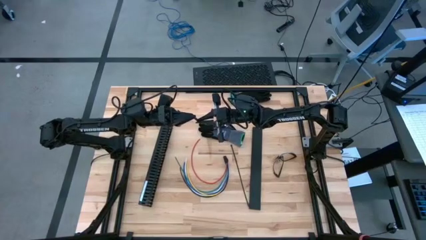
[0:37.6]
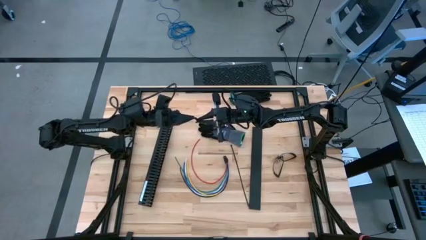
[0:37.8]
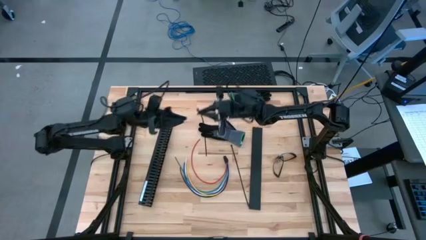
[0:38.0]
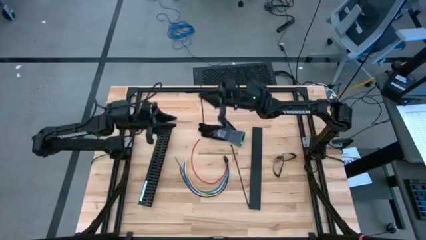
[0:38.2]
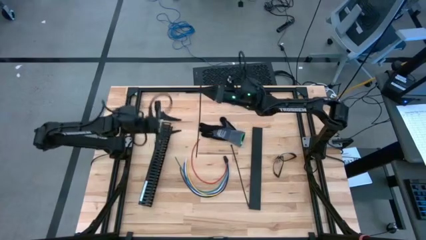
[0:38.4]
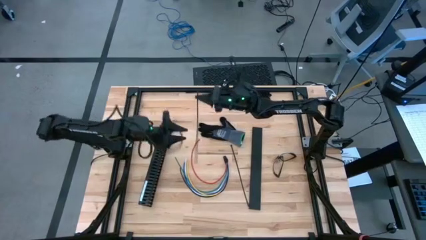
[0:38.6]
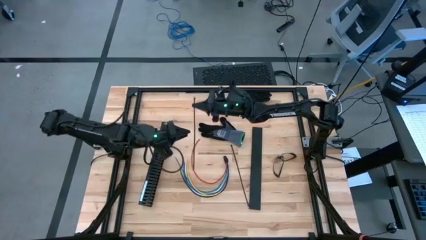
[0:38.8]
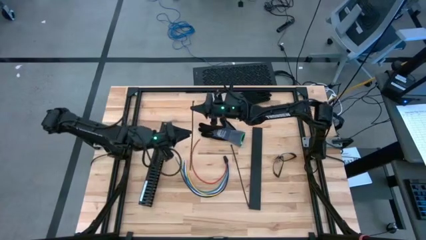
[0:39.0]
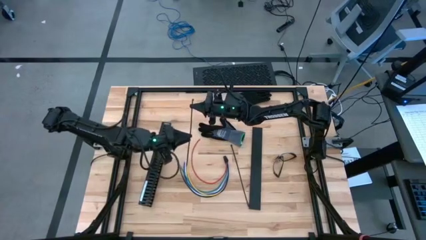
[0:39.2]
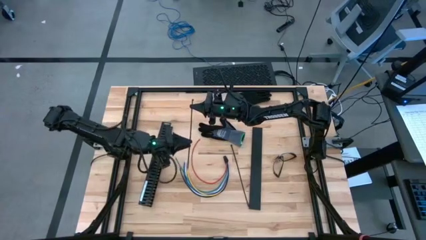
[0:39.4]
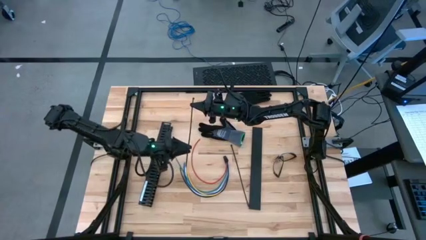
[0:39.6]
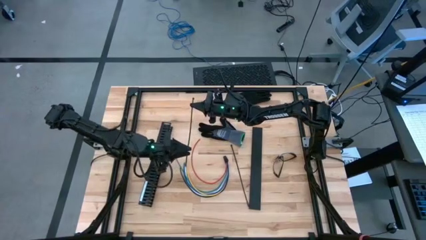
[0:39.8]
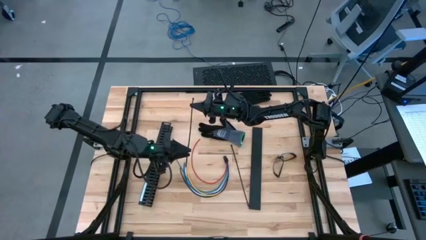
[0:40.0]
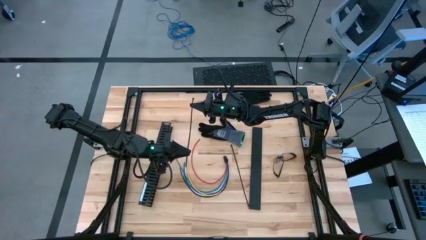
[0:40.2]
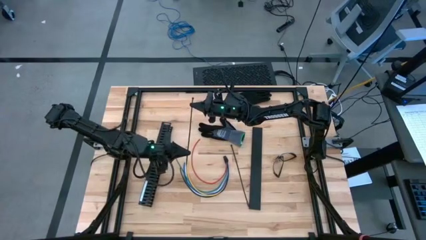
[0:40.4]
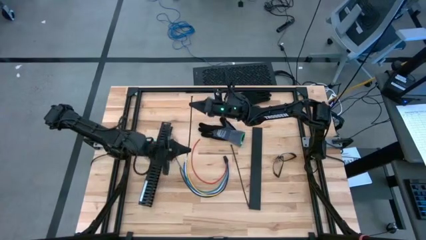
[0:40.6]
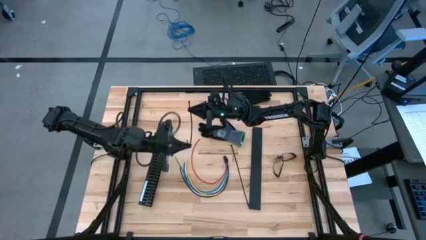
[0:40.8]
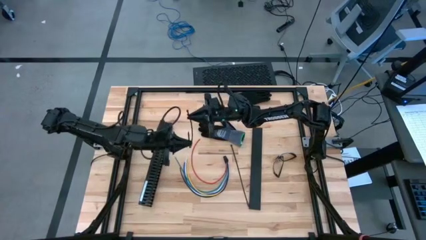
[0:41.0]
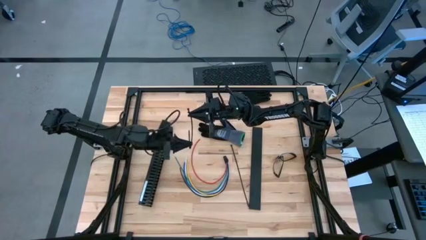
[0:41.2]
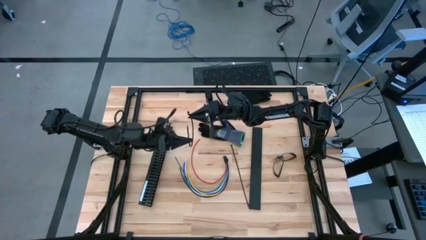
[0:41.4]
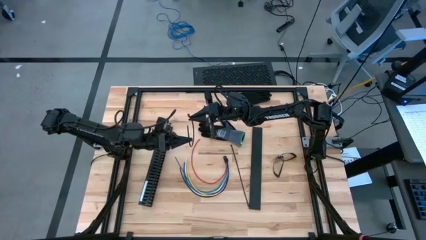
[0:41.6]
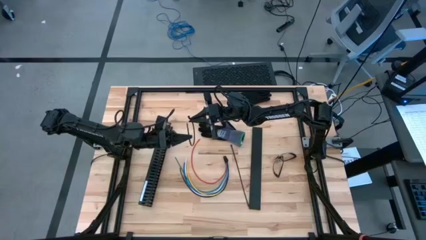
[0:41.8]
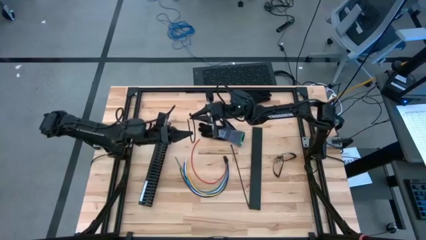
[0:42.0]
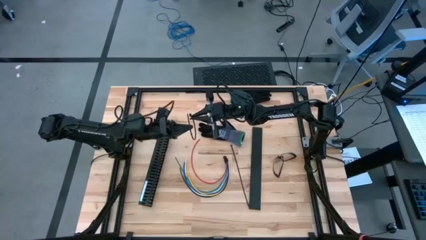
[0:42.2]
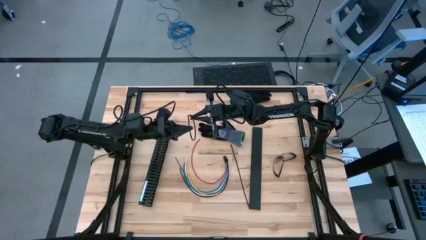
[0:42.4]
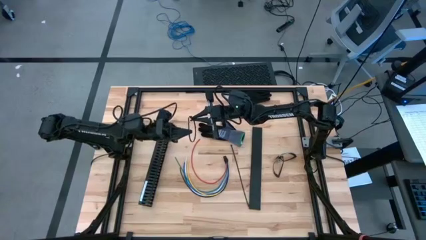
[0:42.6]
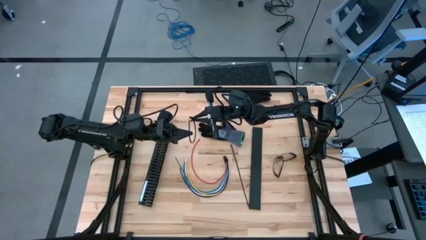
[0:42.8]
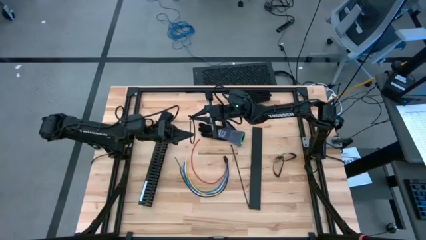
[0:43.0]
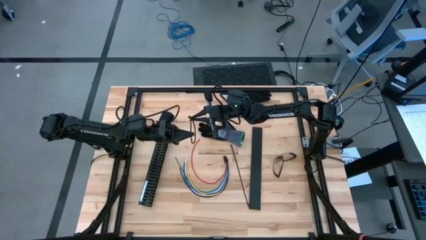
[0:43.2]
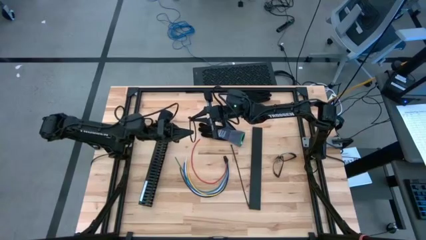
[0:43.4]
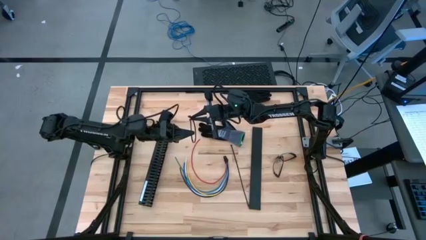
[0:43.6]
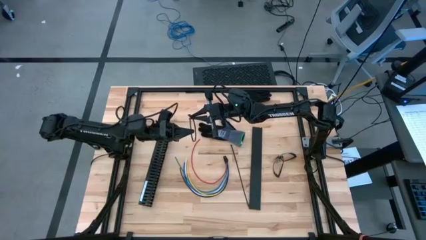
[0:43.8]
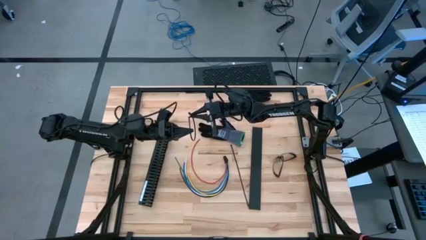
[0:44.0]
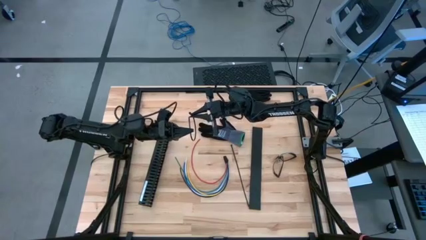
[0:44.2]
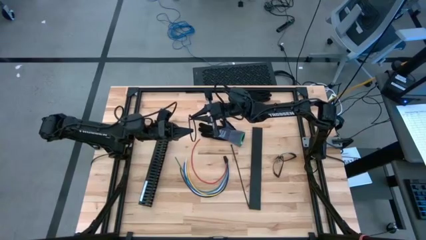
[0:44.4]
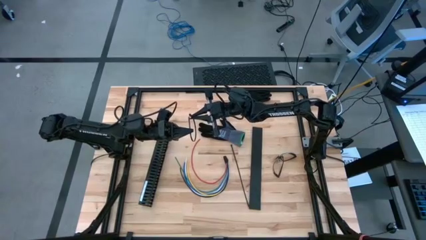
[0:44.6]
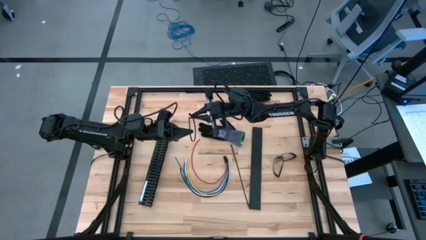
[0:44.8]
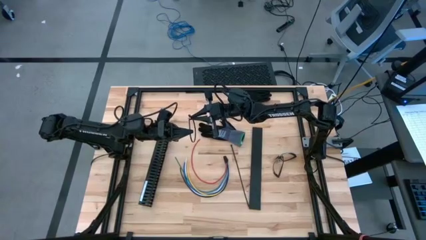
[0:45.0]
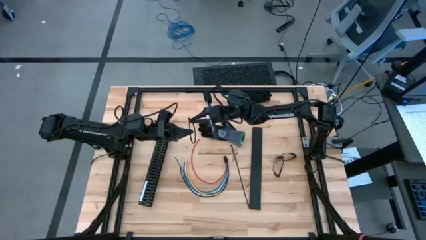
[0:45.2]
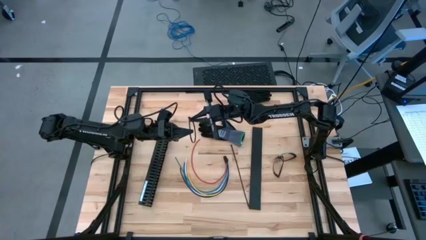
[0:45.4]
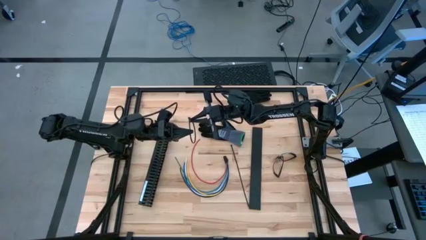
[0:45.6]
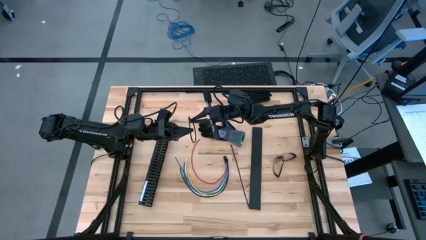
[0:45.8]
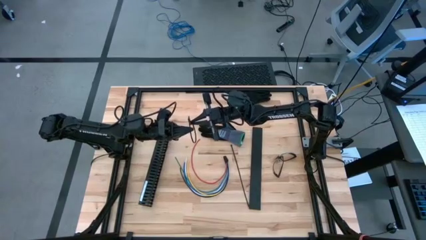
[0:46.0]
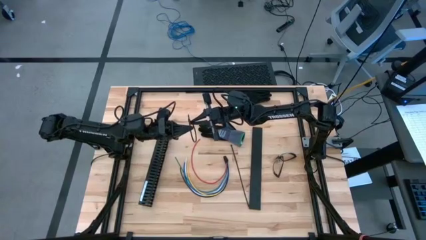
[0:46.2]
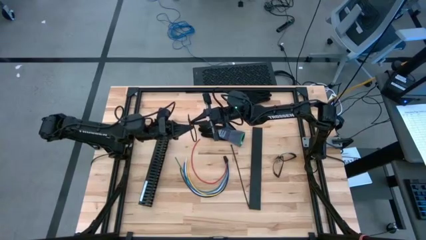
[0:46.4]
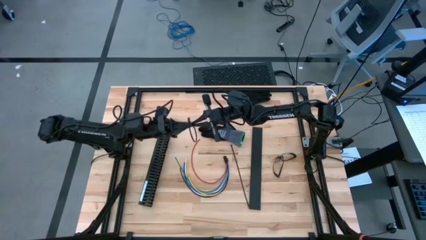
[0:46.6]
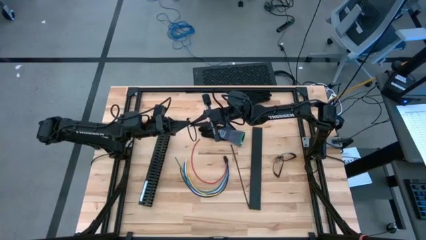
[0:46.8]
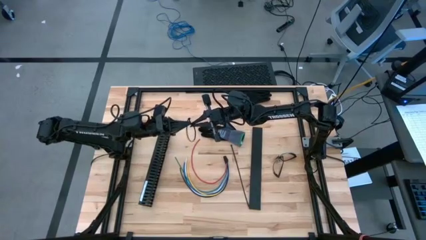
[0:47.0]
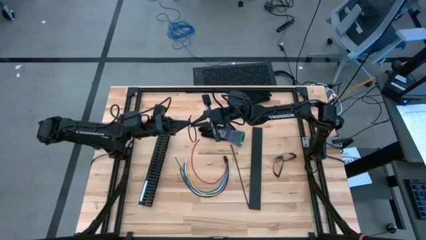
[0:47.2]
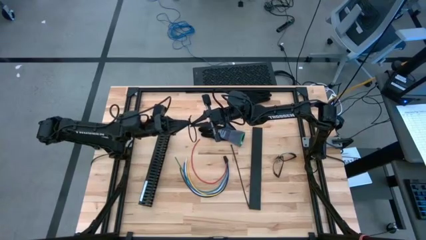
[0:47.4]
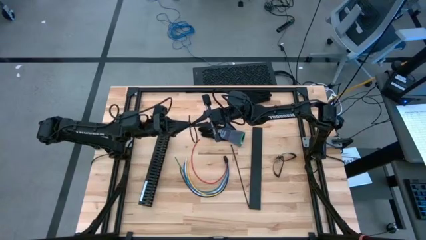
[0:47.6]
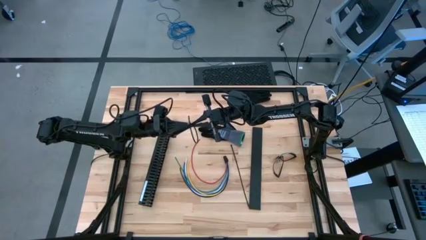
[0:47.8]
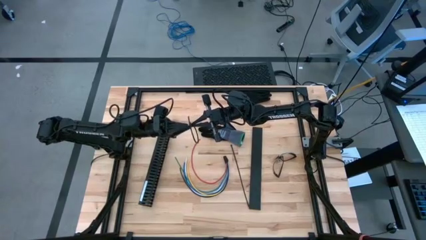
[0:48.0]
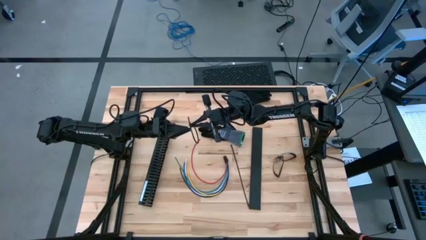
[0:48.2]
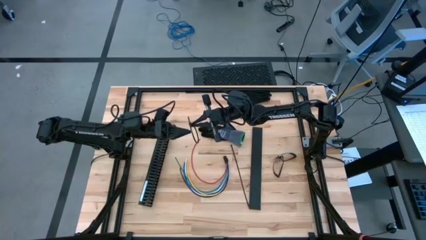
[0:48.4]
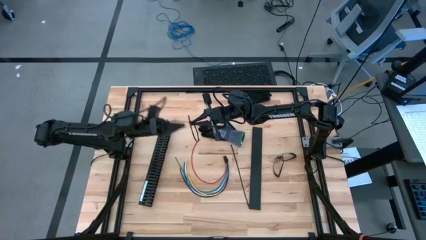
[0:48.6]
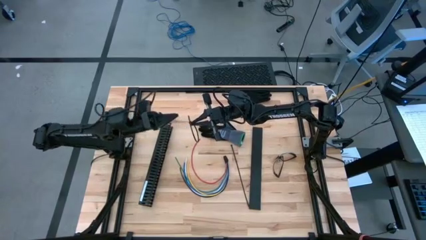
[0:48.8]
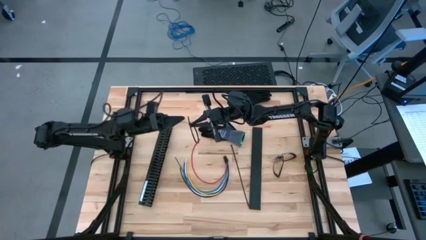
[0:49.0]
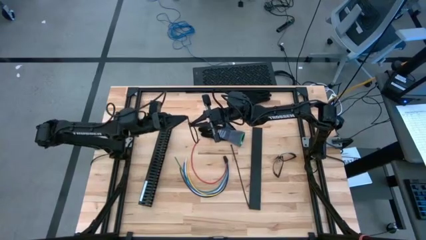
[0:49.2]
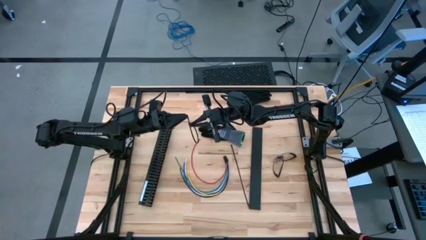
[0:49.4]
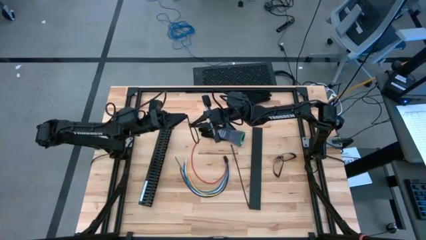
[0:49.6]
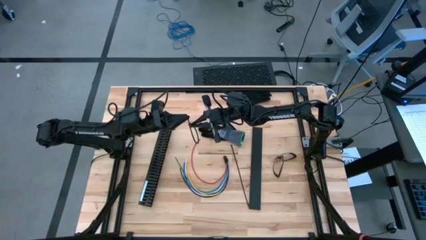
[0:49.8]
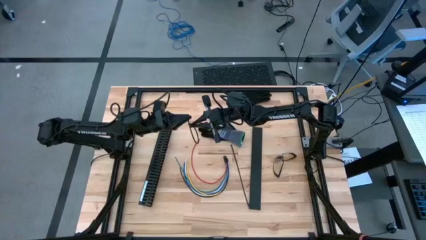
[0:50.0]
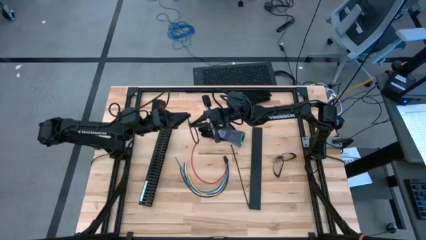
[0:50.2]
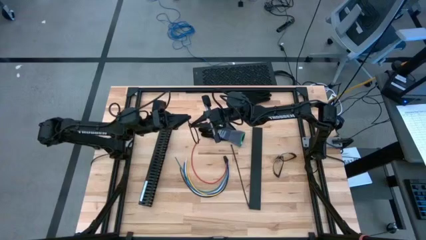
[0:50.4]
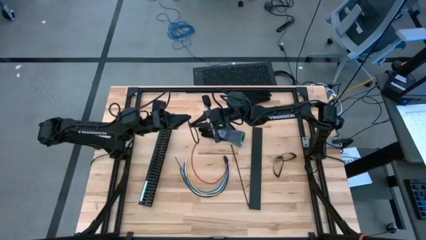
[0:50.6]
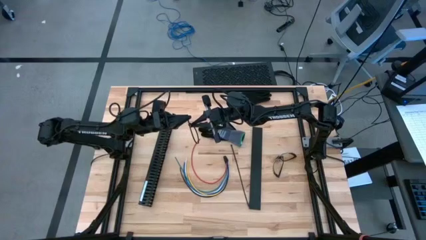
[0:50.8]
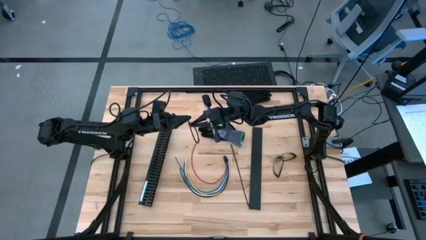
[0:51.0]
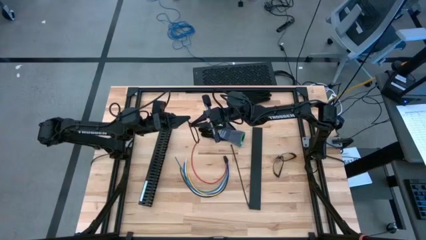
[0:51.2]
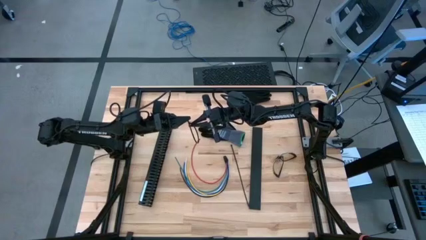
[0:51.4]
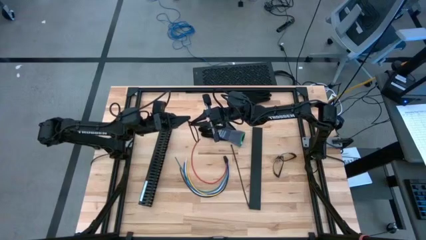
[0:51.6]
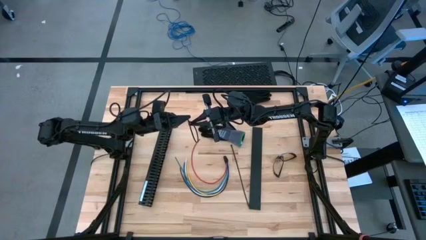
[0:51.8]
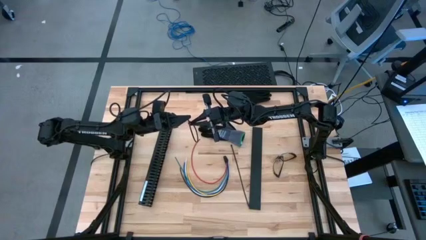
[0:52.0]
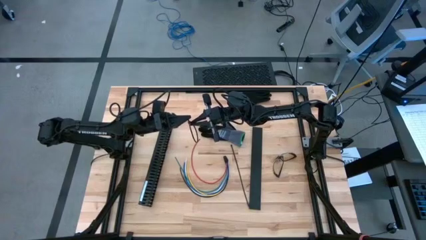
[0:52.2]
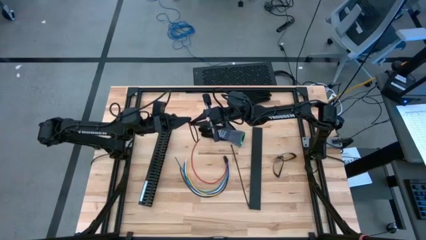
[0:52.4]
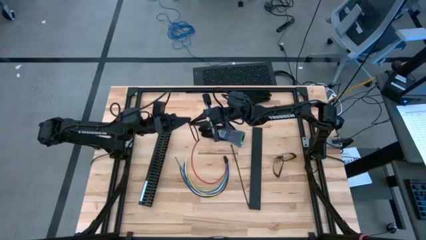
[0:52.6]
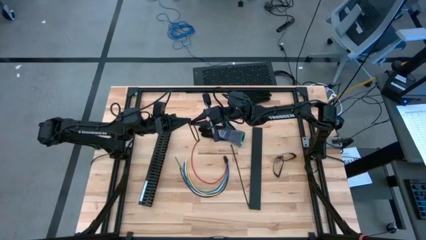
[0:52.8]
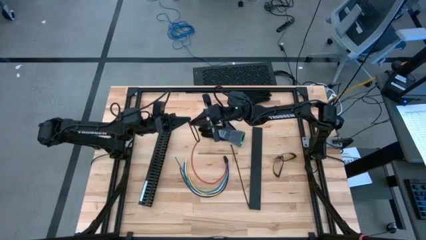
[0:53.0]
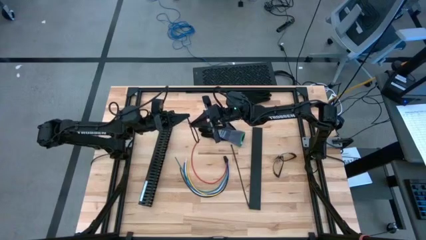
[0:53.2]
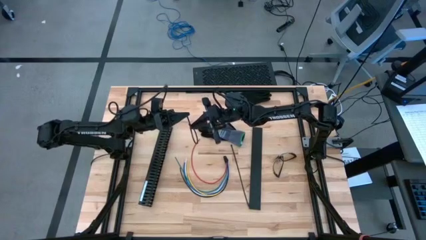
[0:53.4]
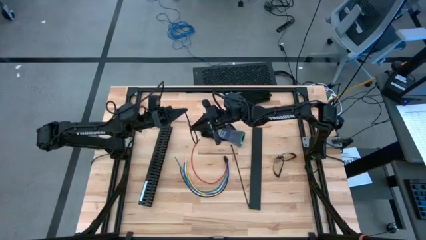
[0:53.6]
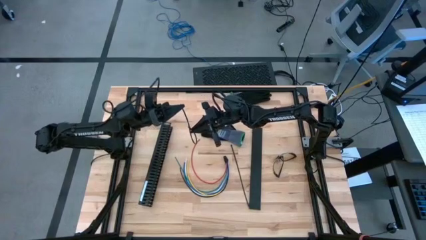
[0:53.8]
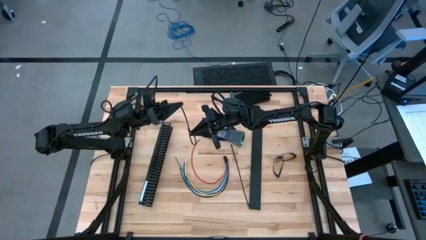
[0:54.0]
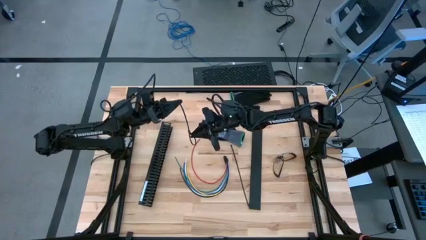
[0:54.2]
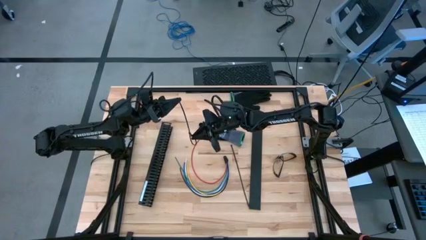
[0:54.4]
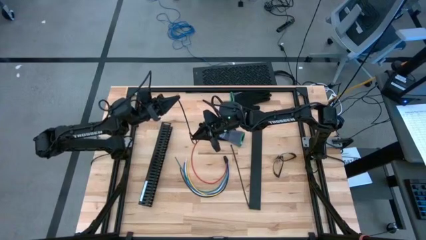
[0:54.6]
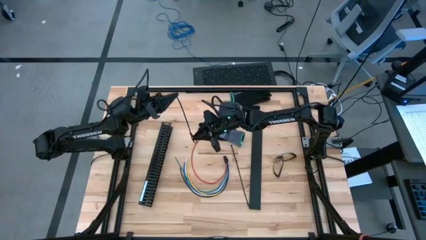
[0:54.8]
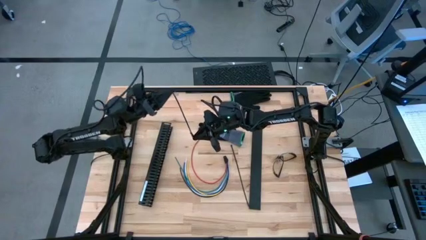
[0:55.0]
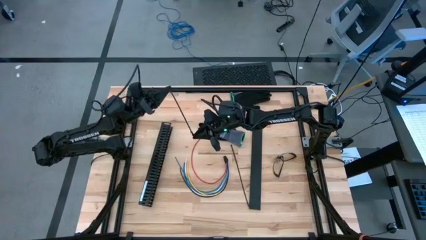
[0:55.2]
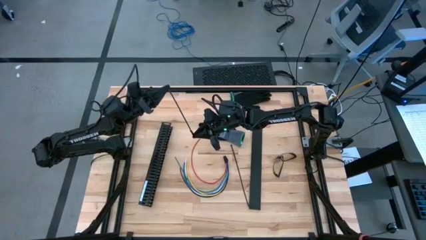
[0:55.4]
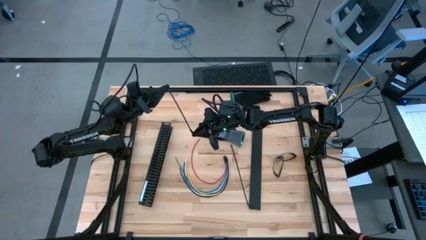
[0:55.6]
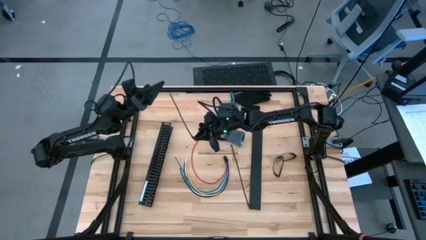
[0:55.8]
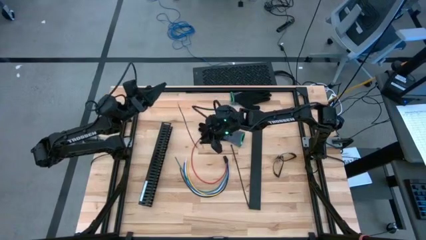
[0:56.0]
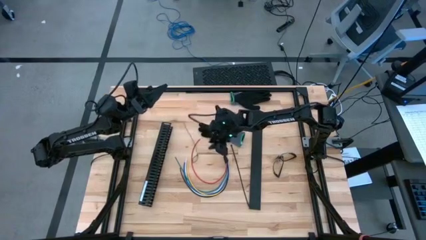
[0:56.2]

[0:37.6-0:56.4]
Task: Ziptie cables
Prepare the black zip tie
